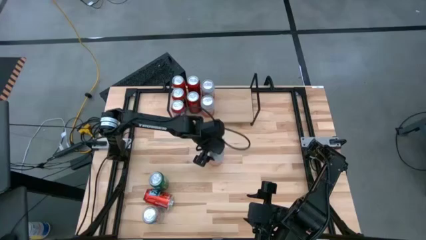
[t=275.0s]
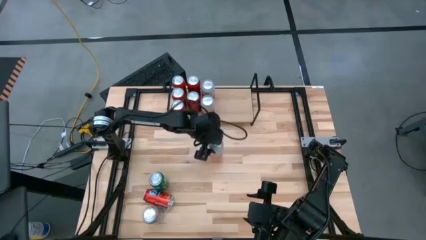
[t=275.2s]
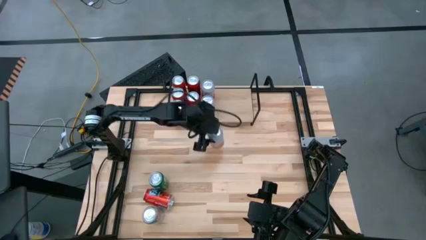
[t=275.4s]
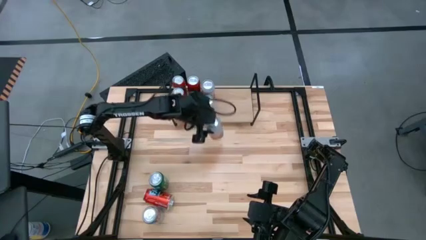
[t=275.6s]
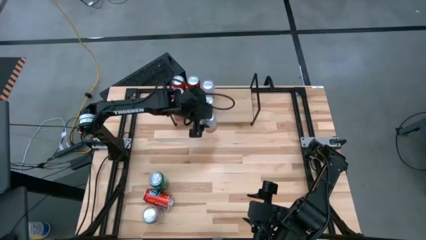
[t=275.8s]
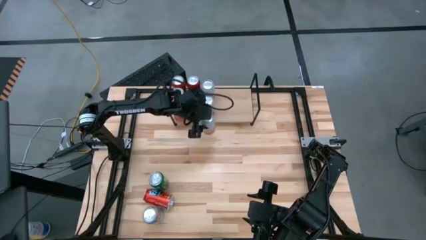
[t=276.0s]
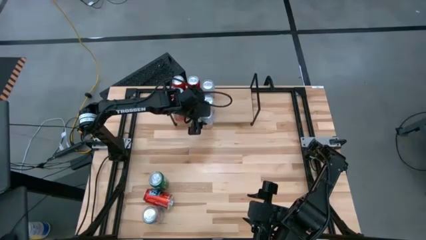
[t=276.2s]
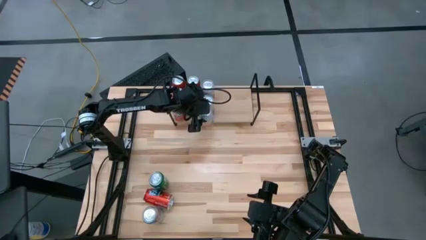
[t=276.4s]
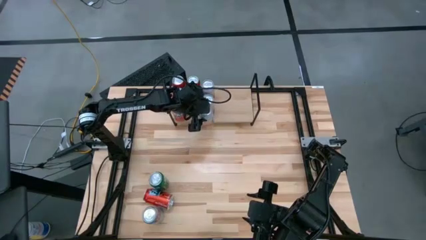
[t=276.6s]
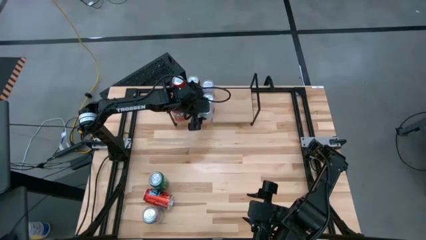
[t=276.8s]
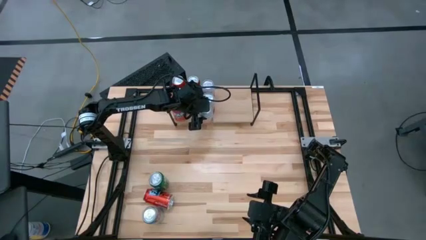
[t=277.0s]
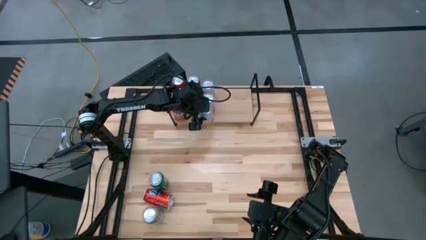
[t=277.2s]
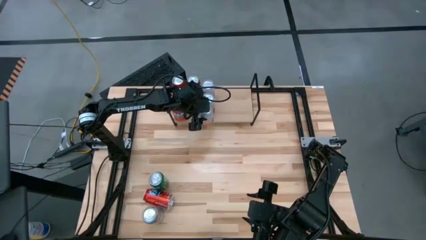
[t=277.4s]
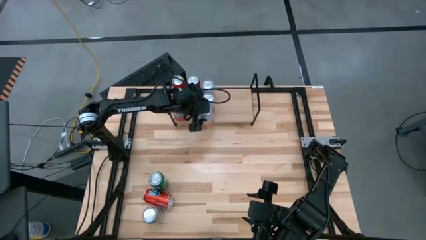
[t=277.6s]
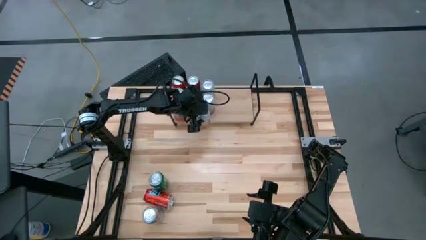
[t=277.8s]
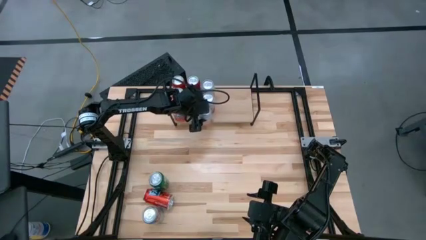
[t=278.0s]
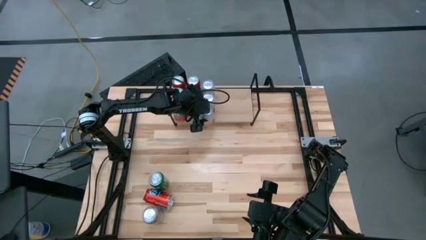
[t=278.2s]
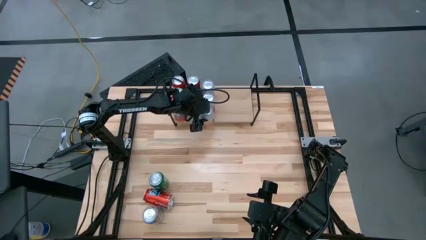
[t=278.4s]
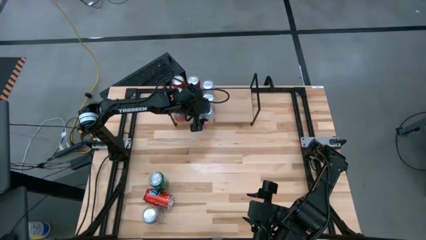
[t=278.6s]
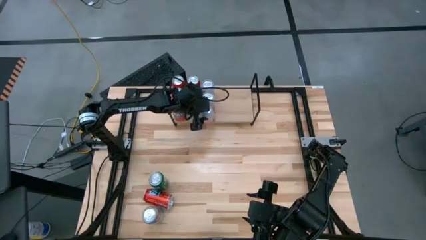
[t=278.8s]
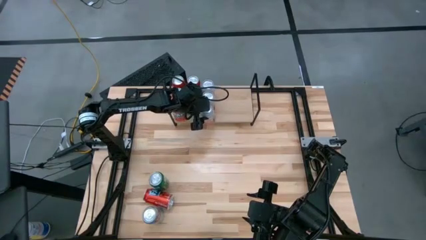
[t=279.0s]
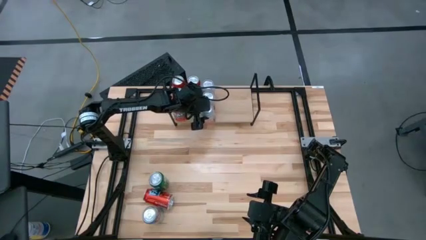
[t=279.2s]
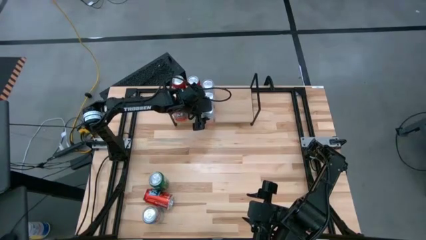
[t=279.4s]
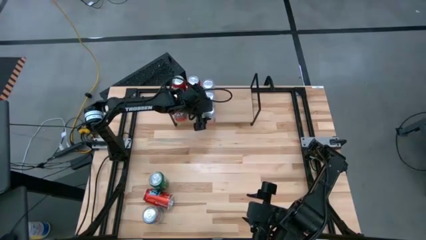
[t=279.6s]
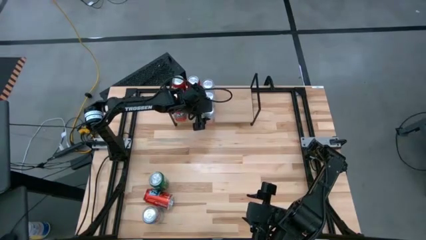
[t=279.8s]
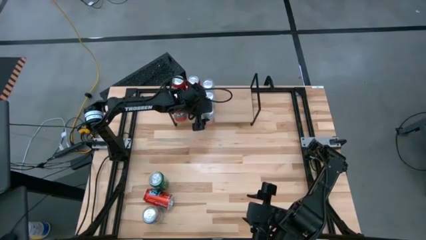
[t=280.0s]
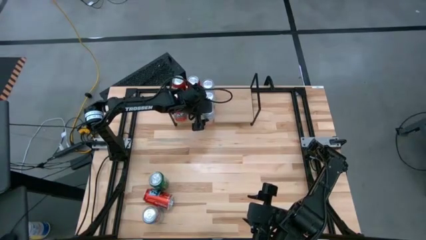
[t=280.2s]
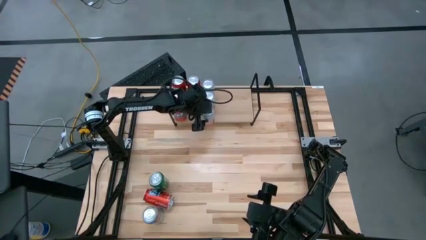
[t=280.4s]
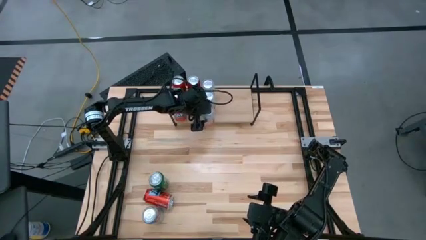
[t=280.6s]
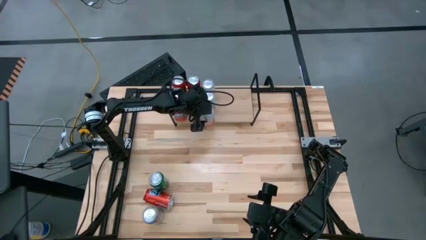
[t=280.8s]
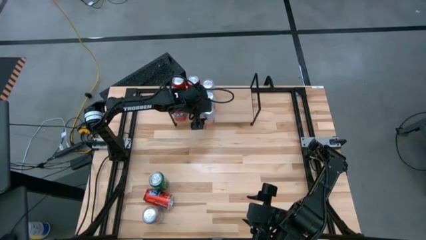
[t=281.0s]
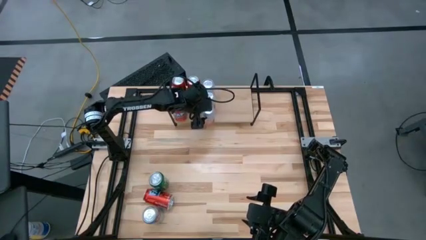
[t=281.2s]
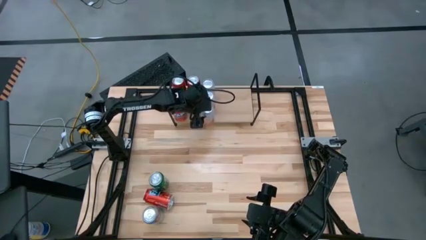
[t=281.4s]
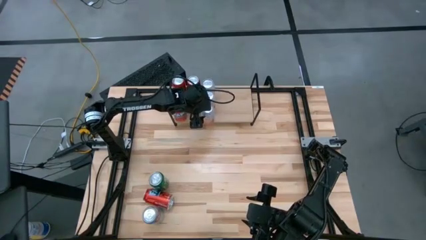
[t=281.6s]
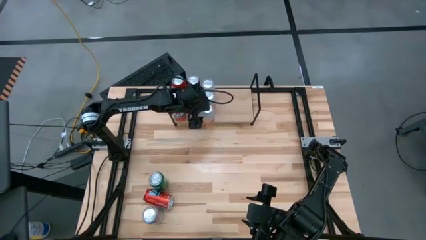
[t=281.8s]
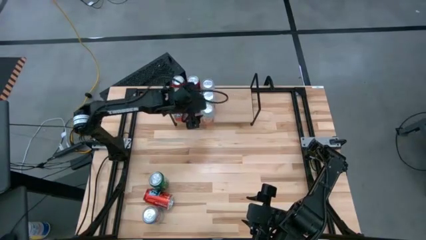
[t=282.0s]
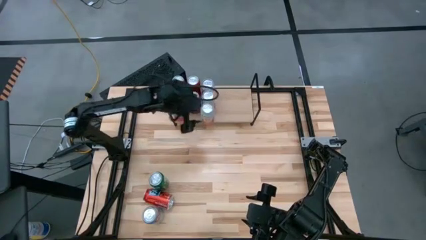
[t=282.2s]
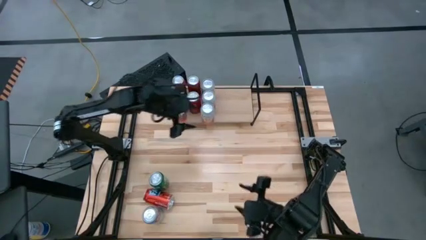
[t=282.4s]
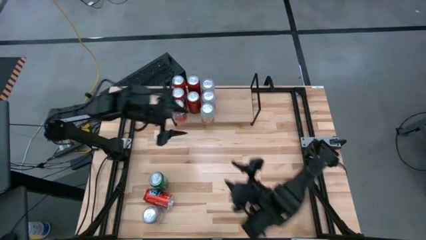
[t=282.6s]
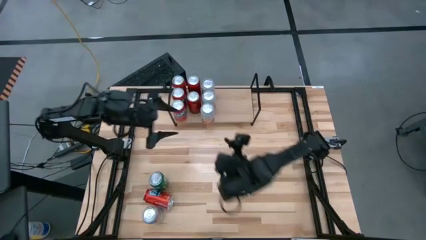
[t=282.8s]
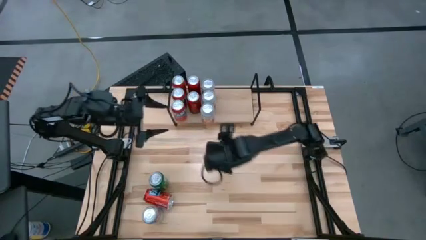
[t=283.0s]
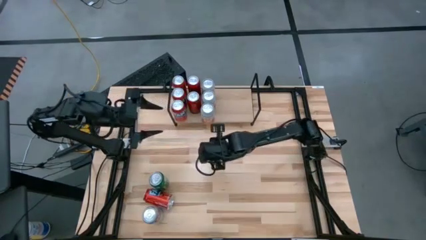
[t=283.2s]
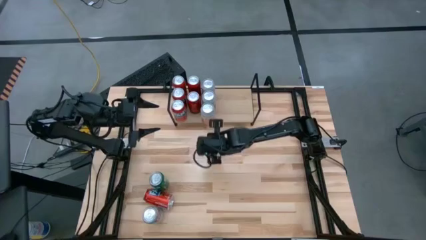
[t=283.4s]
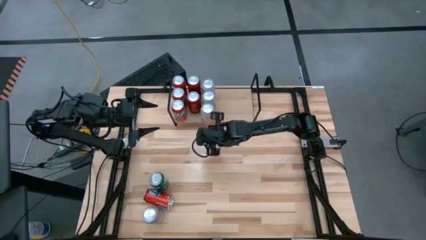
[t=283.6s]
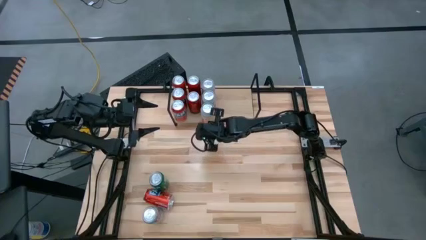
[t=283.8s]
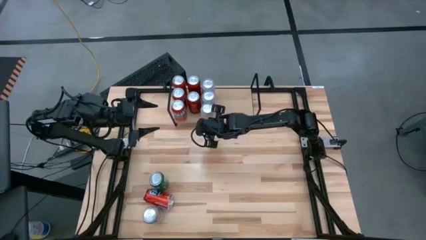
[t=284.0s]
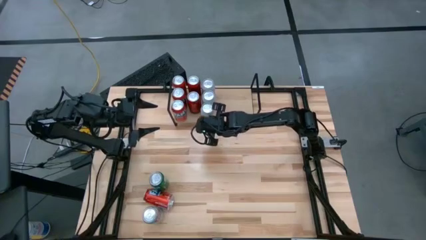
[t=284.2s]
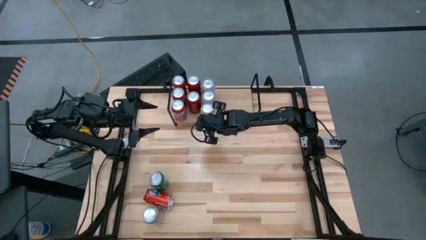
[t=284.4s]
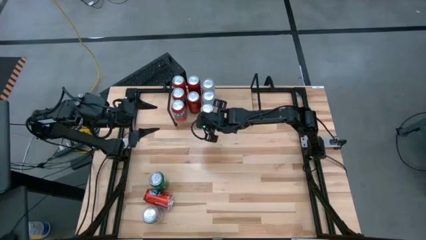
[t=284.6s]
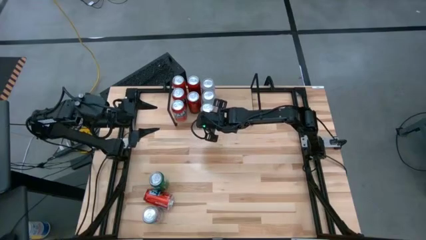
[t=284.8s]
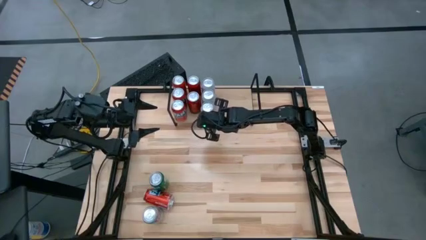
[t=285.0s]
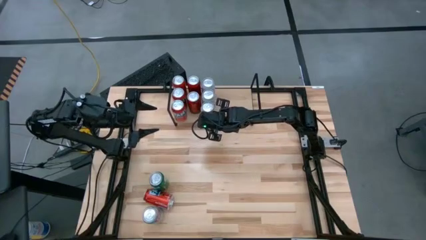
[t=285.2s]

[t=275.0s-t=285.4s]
Task: Place canned beverage on shelf
Put the orange white soda can on the shelf and align with the pink white soda cans

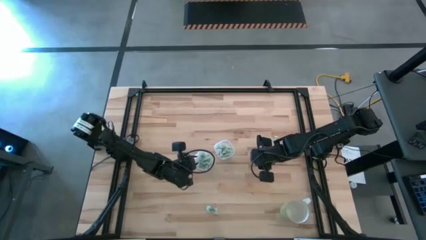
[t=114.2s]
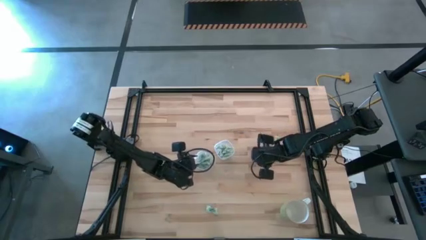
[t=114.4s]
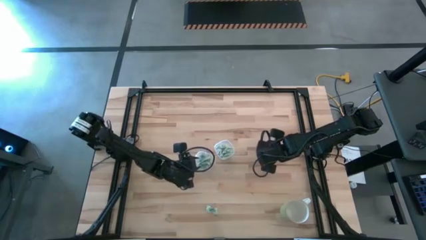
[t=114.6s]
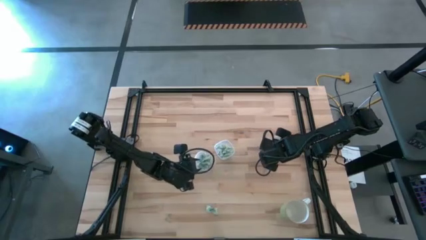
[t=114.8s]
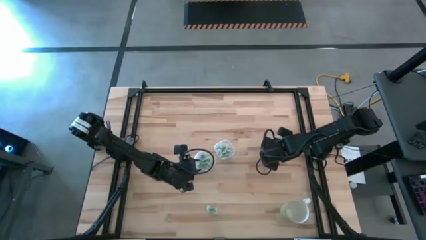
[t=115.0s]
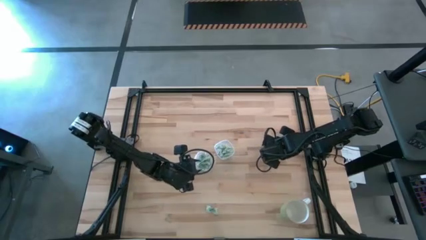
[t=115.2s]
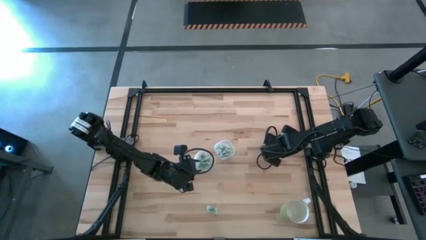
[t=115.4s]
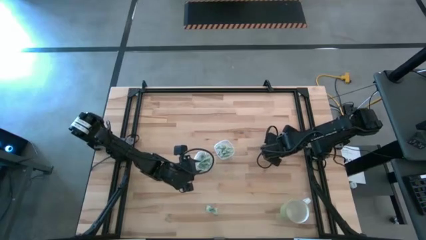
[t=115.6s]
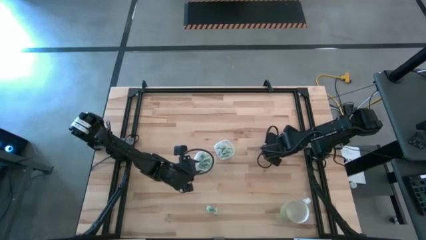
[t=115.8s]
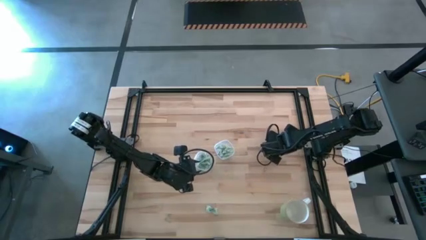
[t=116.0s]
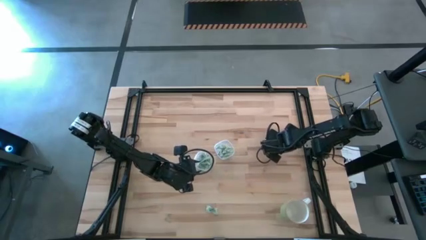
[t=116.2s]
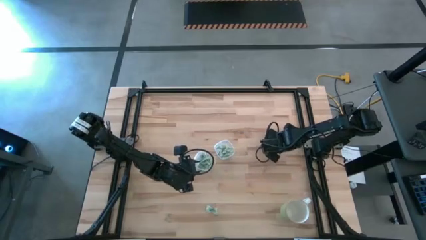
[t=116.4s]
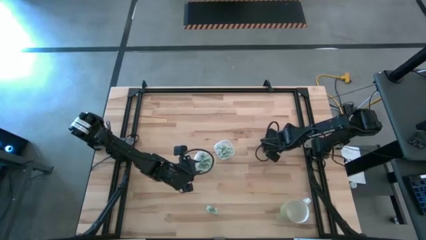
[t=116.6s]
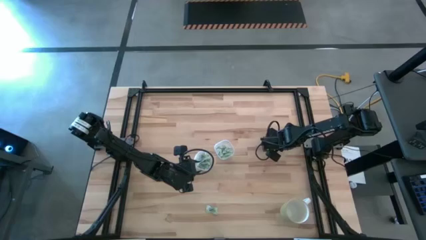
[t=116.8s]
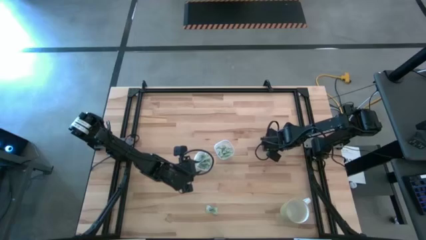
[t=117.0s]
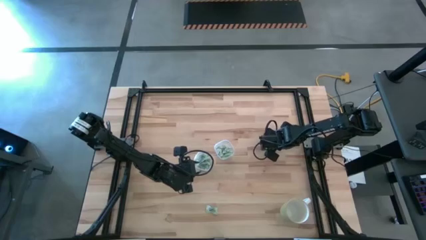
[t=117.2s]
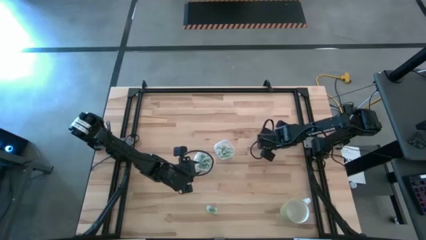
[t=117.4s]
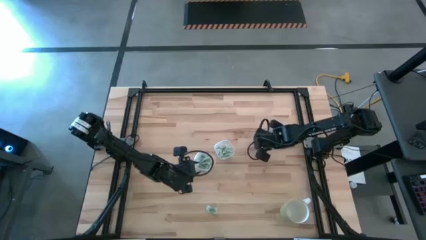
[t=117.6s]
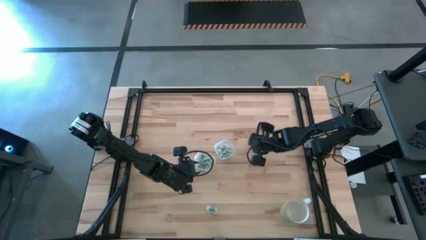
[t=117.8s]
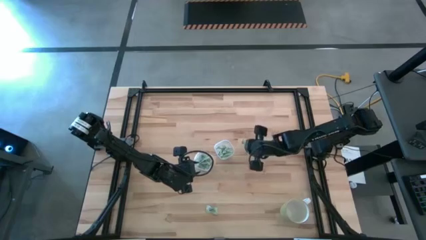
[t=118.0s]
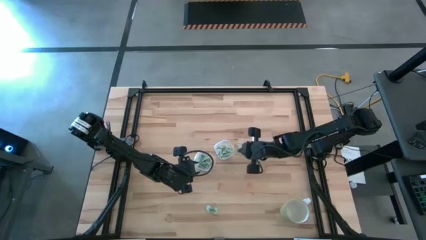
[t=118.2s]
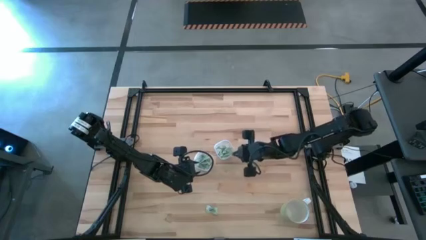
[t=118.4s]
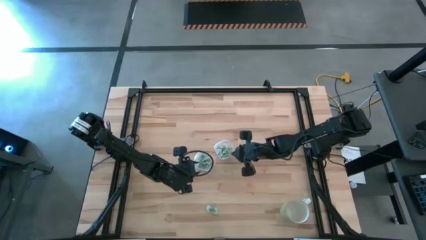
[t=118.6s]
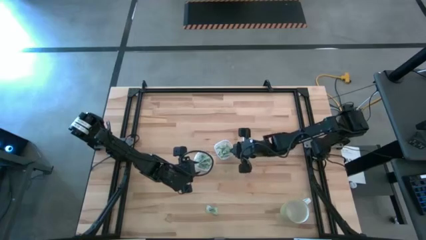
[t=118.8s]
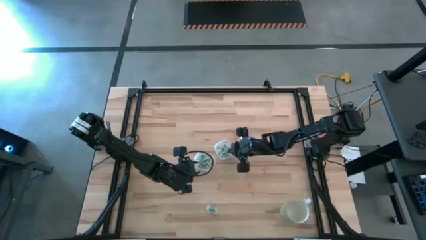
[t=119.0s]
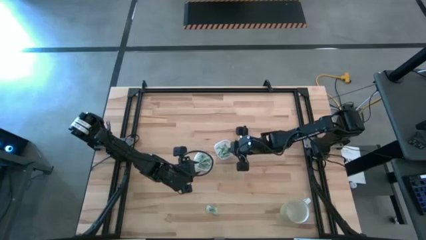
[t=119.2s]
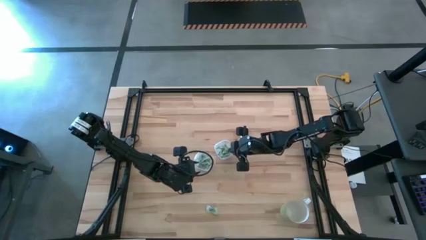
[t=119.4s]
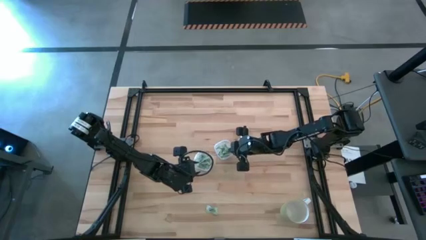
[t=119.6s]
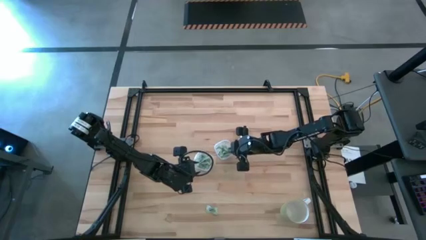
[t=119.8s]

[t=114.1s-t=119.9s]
Task: Pick and place items into bin
Put the stevia packet into the right bin
